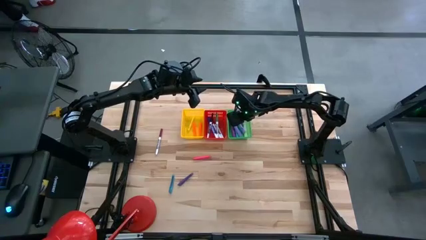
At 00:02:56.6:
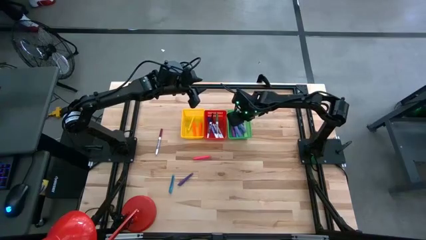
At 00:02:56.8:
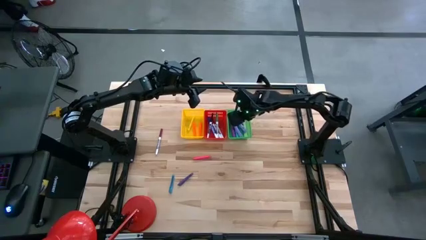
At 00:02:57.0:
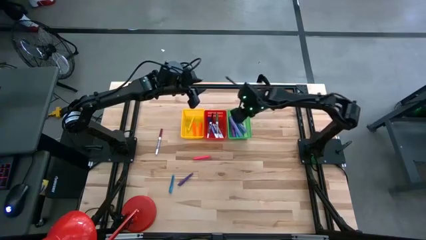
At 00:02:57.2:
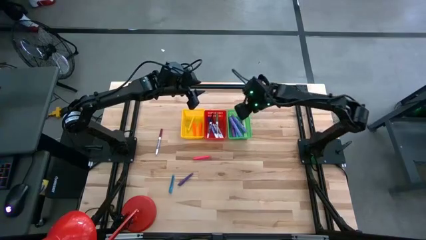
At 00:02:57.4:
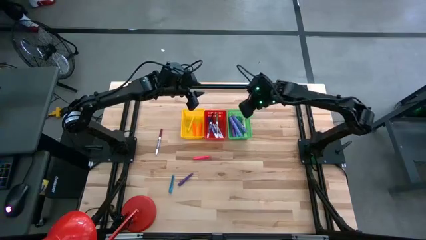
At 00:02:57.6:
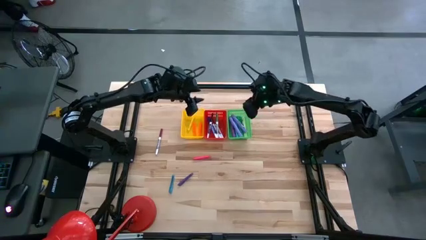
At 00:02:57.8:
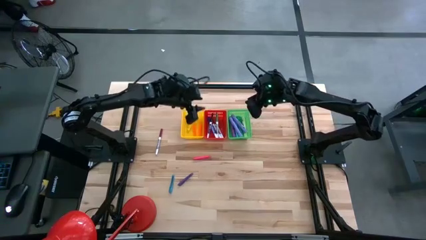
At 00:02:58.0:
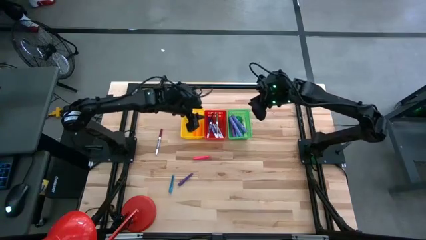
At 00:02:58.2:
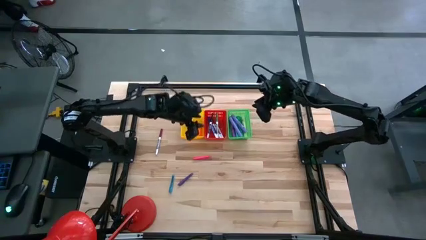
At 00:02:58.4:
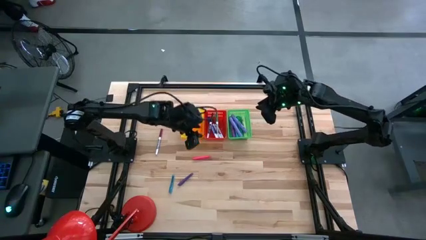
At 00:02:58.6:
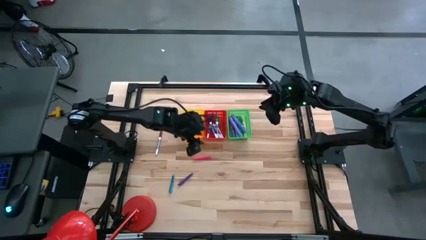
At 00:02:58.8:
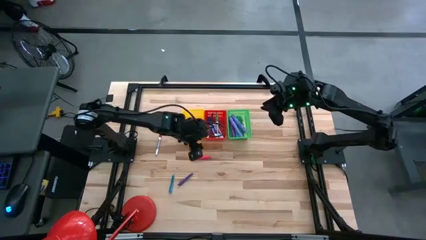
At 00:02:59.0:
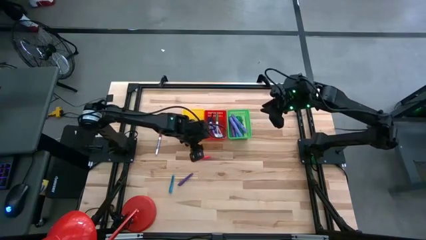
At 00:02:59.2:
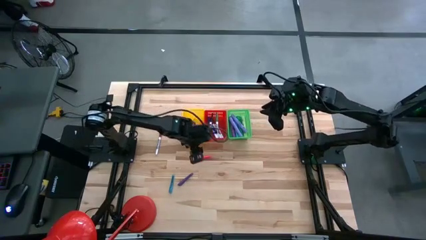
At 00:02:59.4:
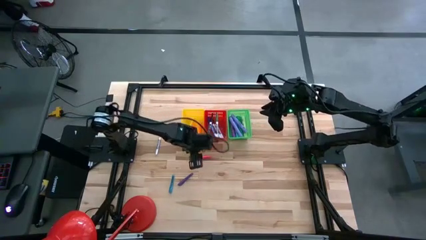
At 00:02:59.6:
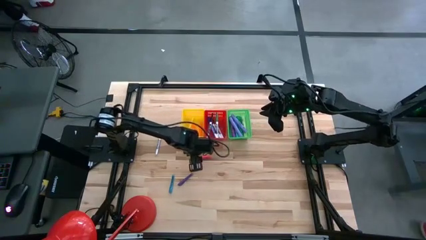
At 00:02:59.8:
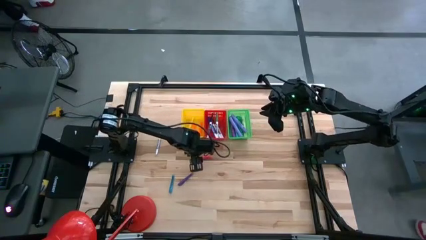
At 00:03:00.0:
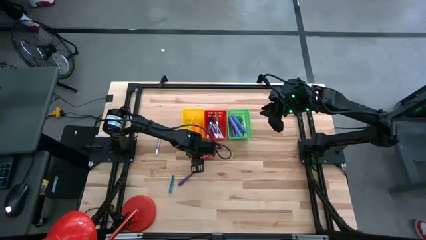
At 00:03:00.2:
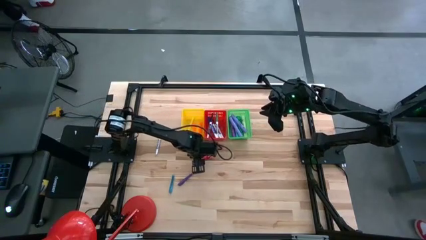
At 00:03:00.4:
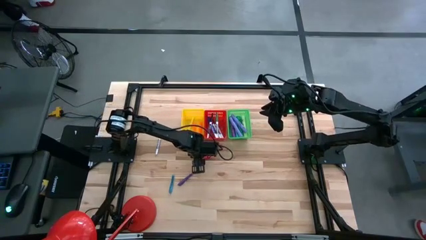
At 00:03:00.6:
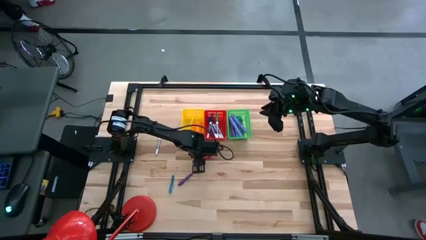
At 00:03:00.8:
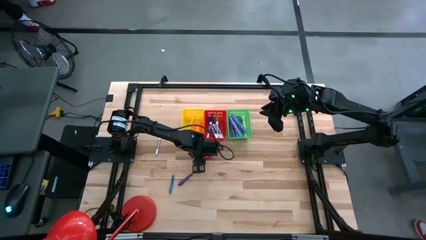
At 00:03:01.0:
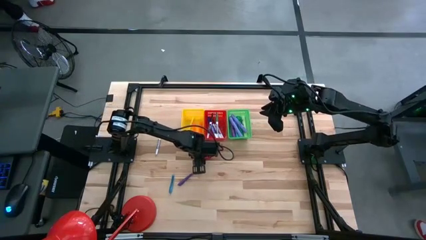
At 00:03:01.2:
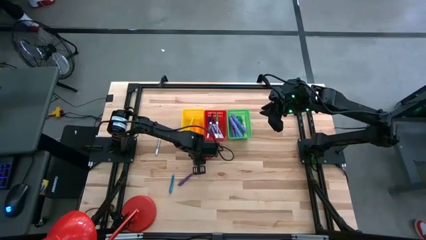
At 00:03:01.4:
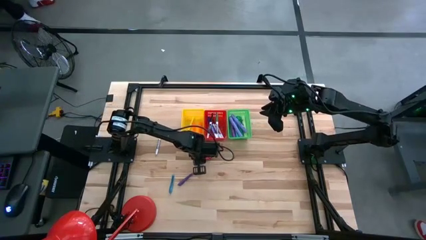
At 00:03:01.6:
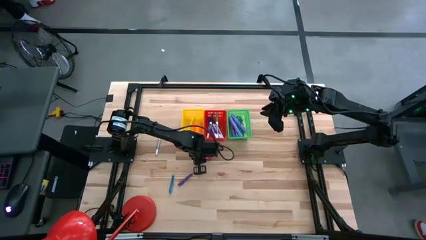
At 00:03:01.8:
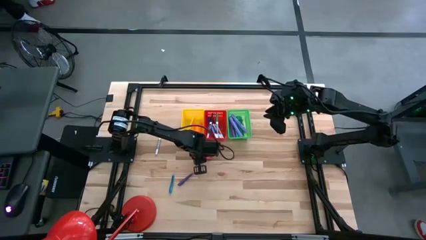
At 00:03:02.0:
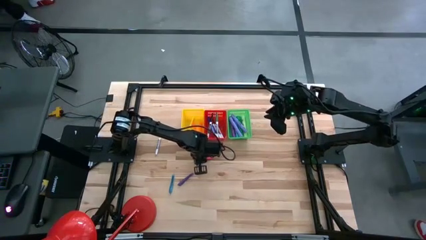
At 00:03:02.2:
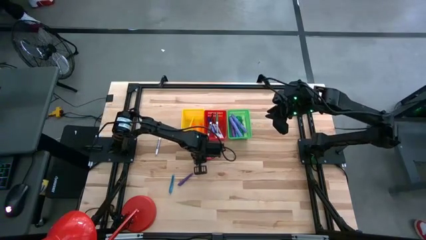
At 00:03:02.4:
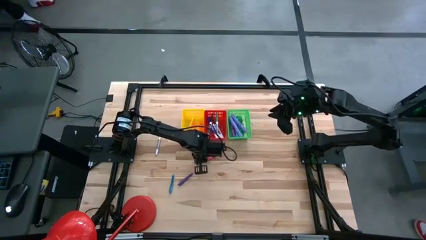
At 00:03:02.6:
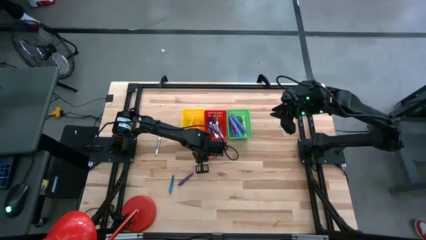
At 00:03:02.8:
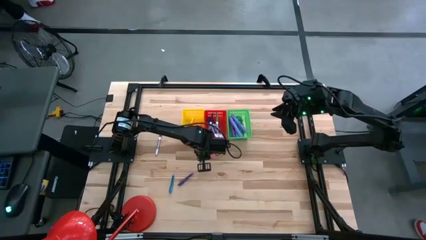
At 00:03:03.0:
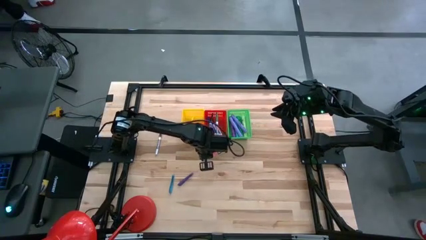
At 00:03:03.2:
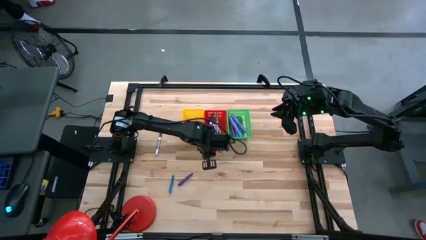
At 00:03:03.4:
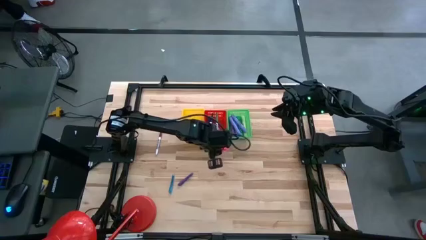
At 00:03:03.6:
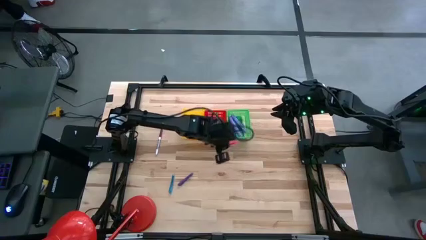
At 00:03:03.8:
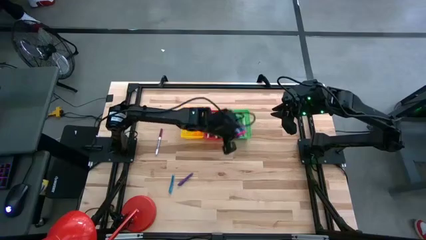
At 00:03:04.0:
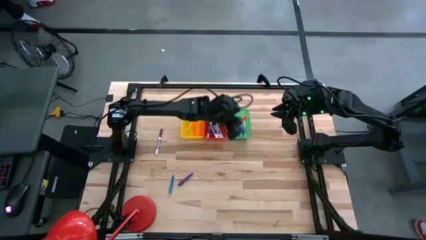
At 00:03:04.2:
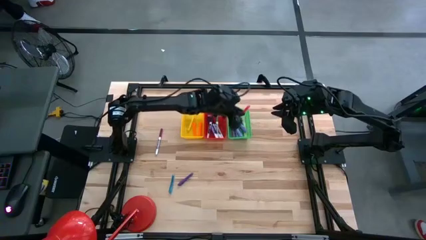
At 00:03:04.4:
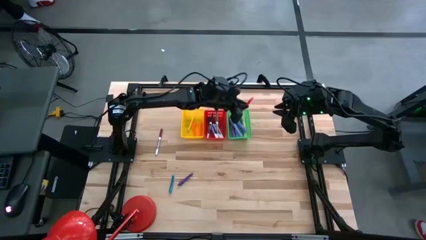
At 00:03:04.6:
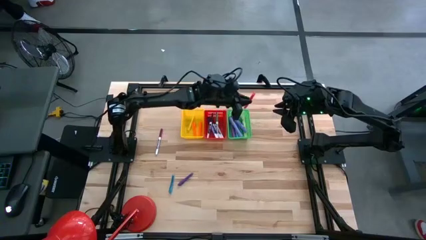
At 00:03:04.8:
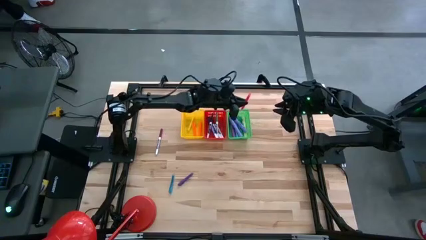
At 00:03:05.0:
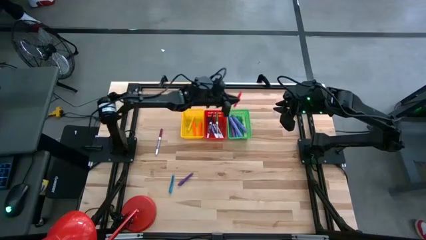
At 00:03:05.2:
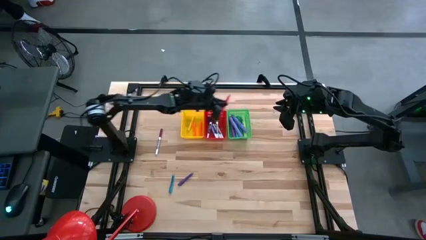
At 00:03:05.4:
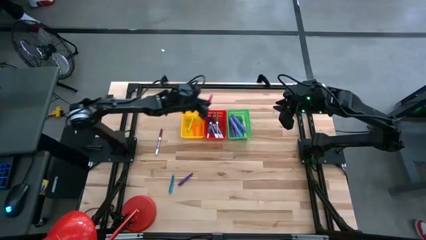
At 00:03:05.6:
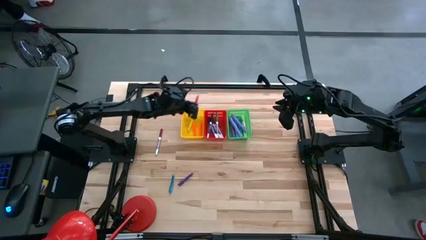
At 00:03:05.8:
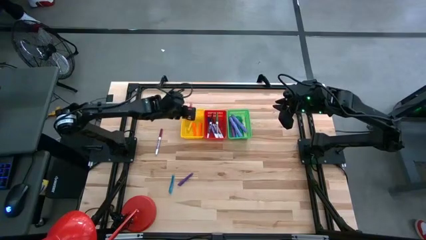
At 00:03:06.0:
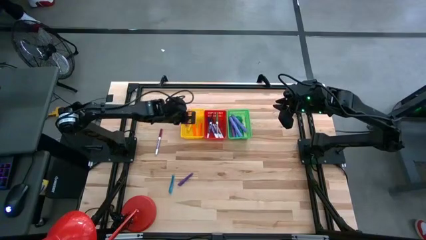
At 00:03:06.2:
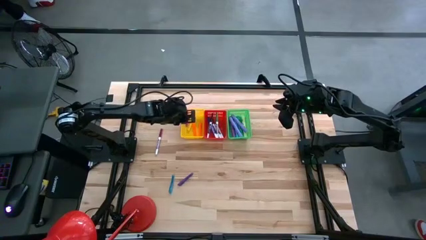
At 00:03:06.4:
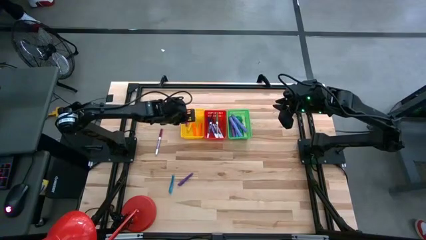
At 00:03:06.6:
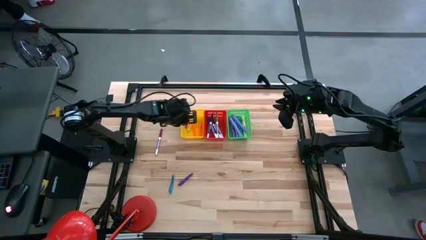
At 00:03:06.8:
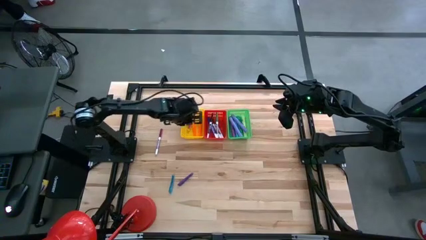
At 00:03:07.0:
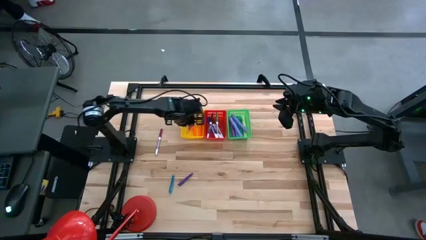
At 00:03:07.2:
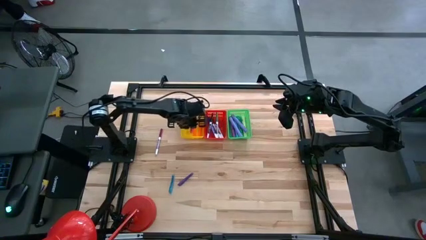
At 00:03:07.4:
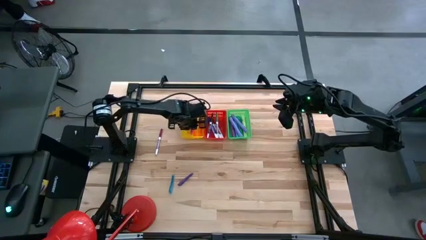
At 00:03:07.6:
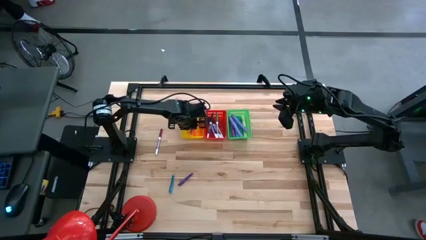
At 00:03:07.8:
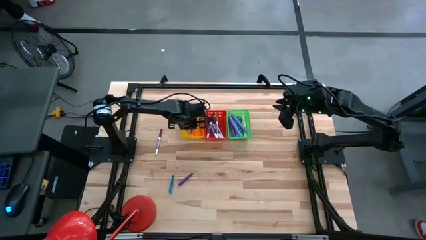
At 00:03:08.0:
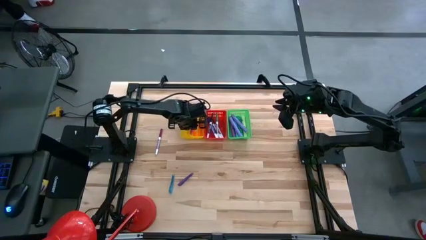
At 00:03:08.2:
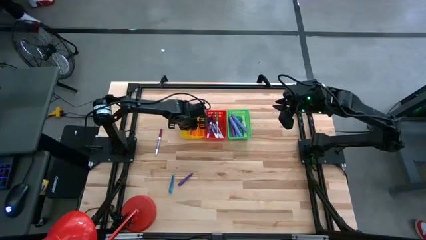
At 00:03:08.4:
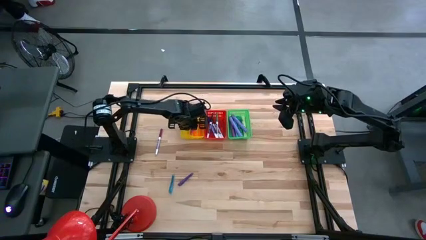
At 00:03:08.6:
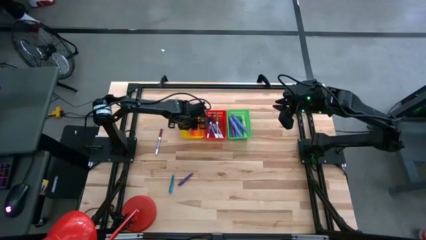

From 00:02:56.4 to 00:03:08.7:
Task: Pick & Place Markers
Put the pink pen into the yellow bin
